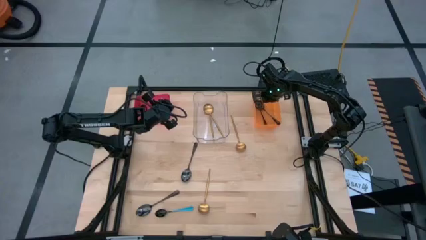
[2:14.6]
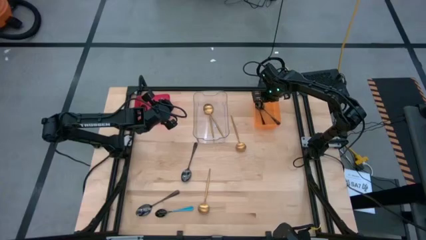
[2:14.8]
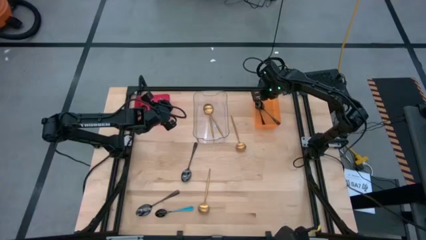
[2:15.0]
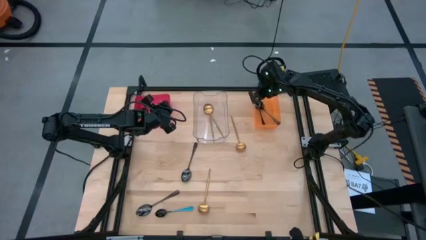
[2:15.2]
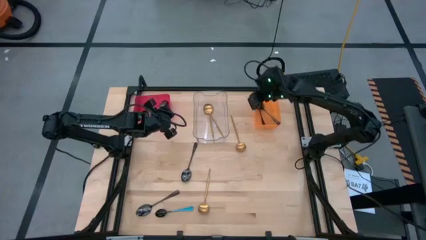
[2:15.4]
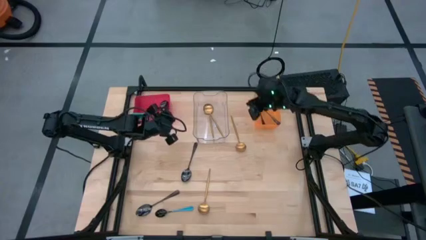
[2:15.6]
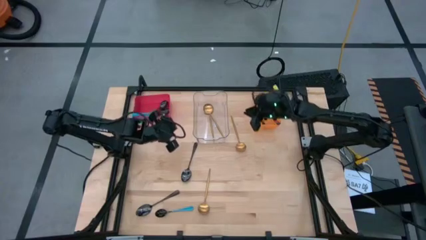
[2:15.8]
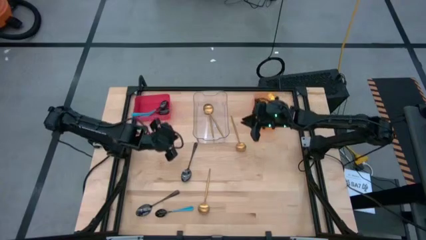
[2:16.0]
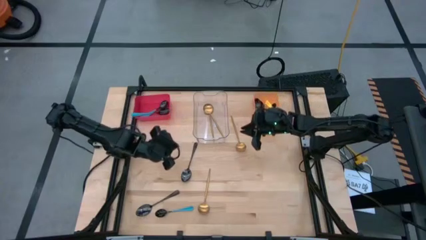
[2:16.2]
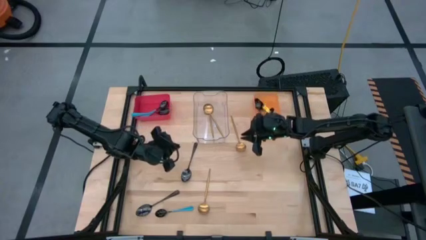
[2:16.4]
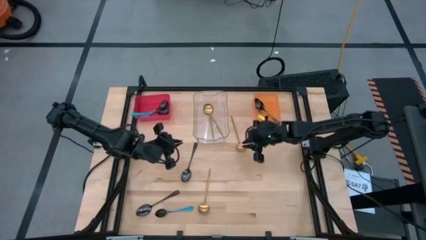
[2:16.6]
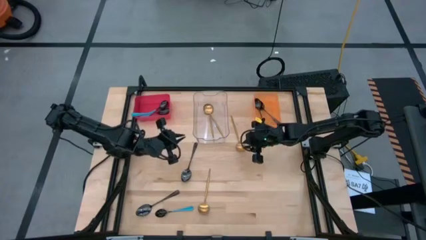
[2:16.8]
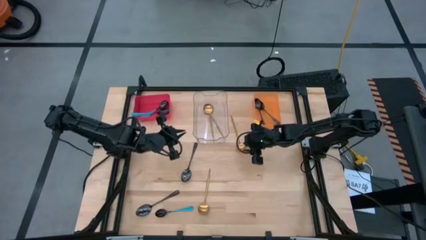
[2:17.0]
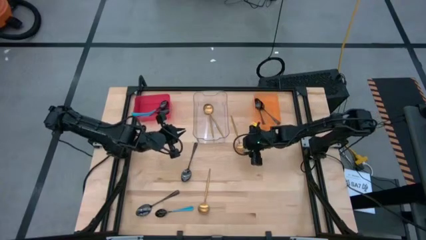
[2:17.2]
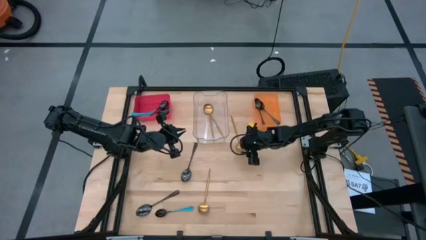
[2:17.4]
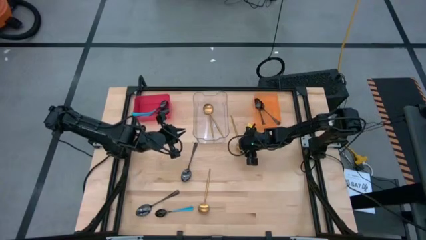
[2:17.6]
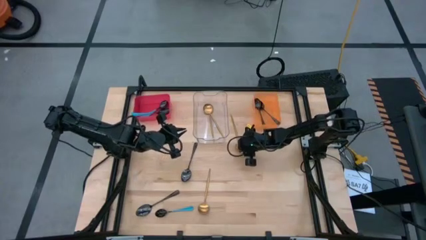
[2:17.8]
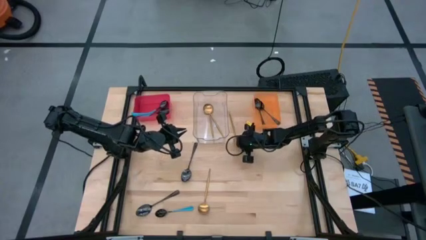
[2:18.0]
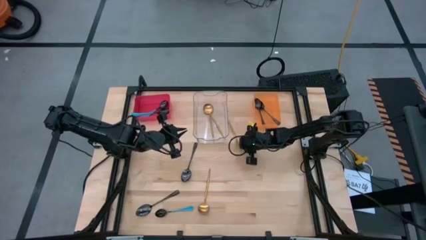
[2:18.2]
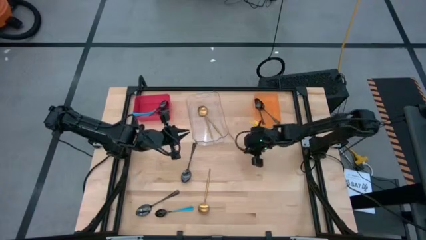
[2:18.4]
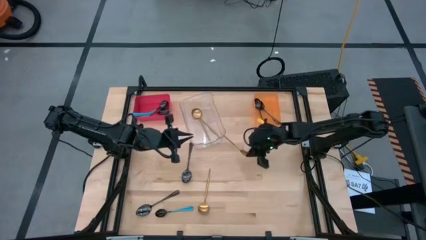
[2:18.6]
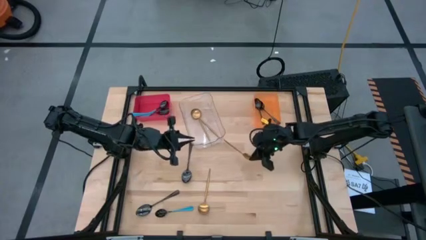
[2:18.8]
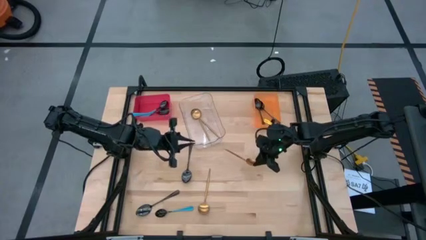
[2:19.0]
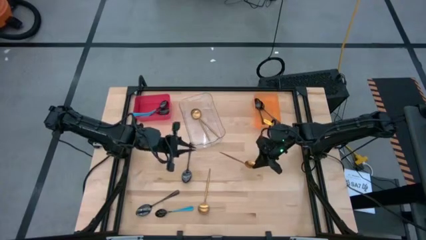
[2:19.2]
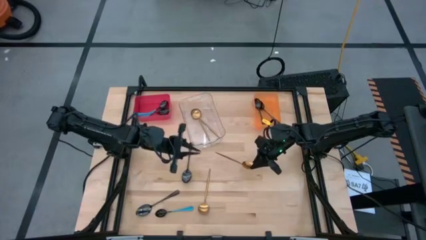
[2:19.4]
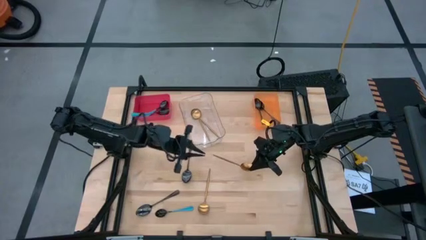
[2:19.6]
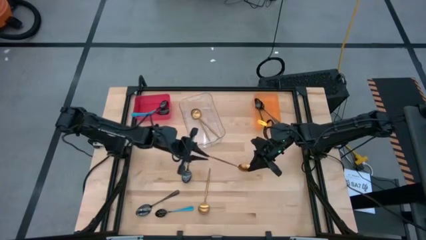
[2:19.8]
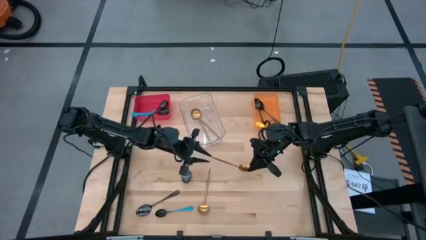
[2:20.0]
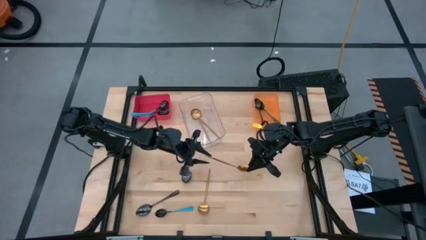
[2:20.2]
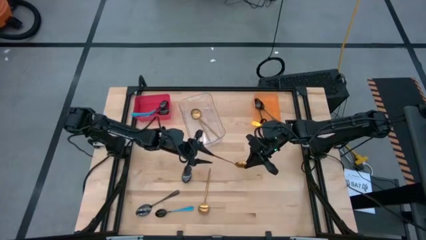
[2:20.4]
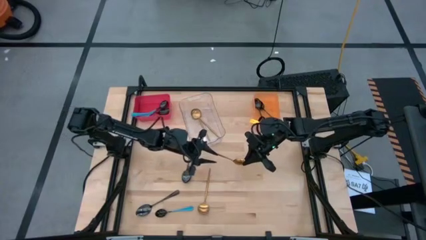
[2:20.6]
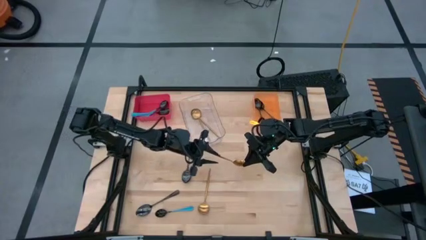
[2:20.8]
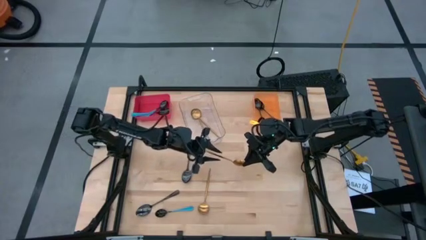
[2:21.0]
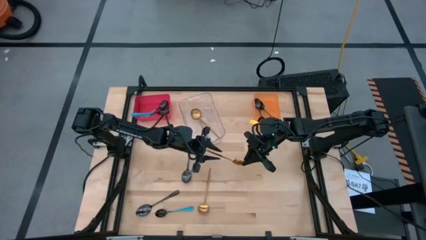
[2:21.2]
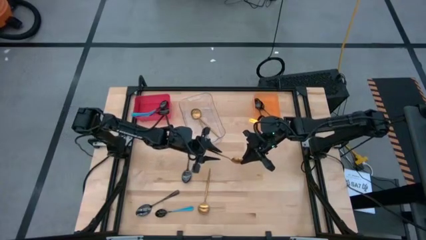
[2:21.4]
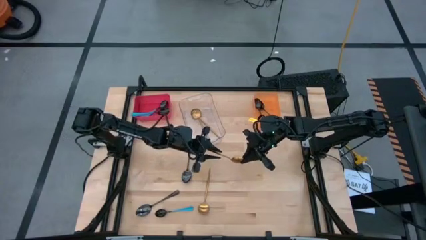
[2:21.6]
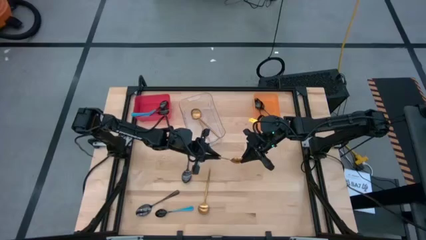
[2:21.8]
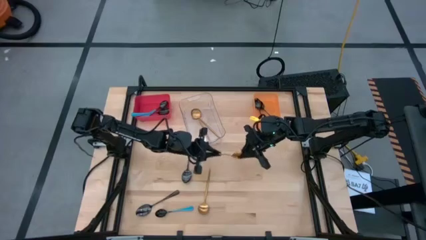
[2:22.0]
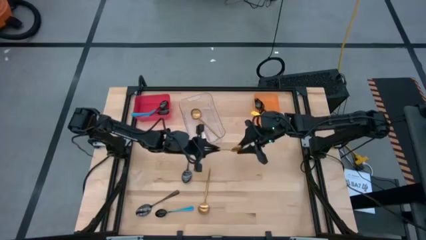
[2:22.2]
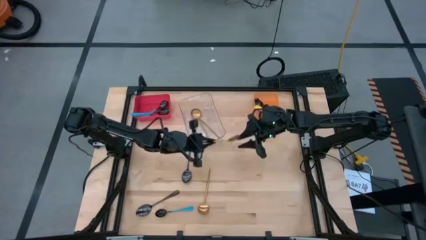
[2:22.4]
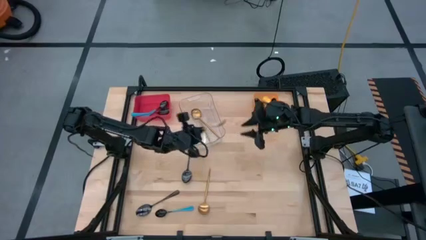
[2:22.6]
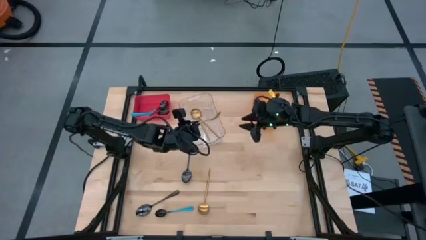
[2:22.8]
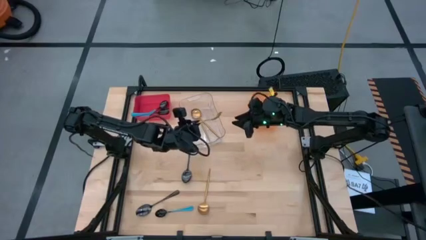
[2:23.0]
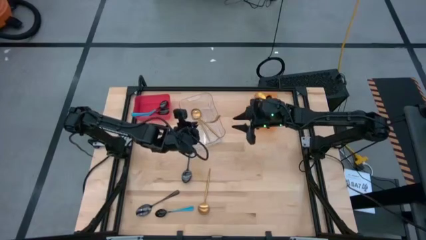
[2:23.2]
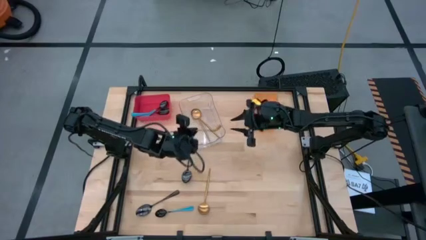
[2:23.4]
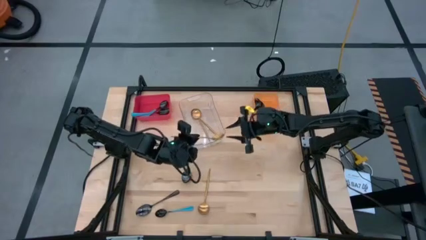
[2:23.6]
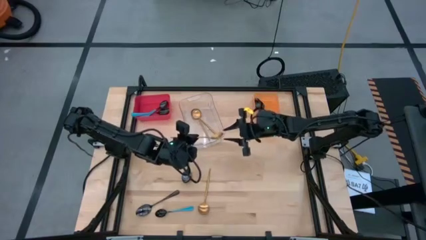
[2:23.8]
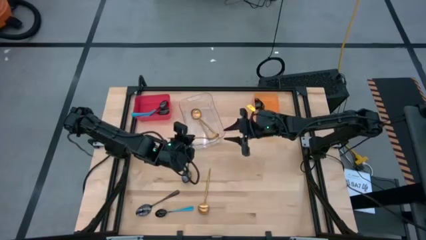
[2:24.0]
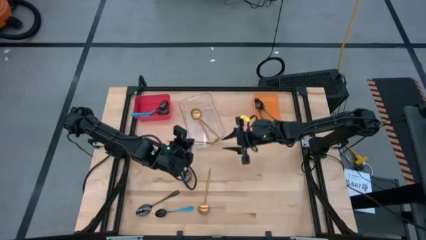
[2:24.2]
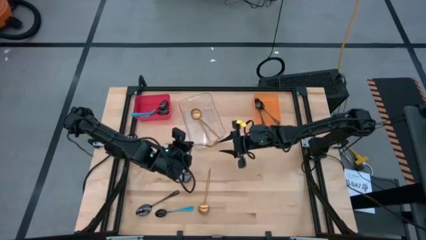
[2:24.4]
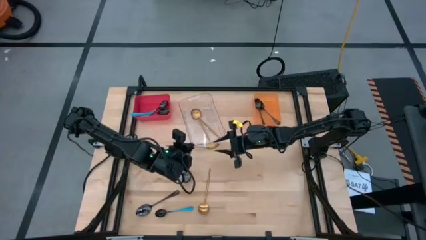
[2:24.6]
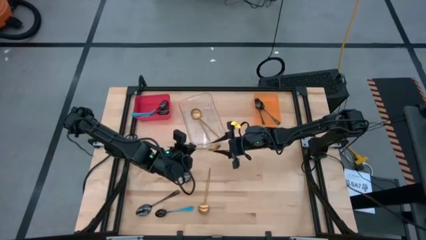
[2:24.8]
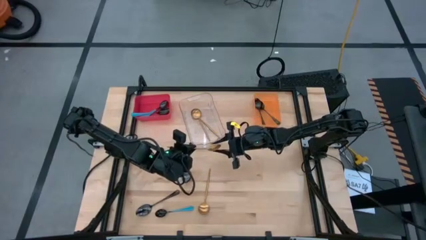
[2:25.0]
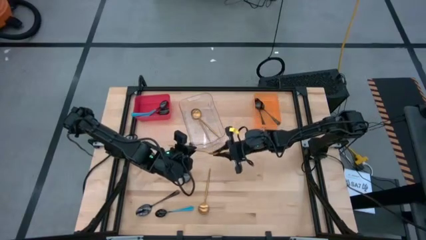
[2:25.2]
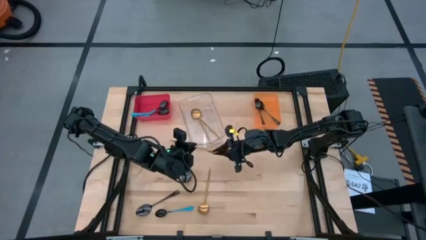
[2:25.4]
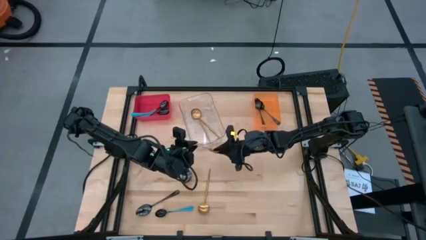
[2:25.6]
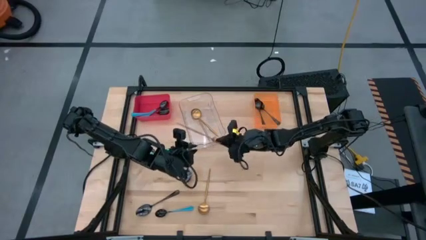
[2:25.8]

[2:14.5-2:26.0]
Task: Sort silverware by color (type)
Put the gold spoon into the transparent bin
